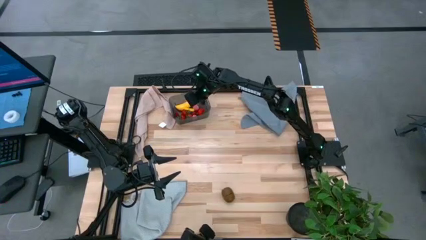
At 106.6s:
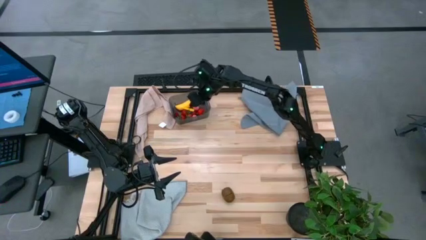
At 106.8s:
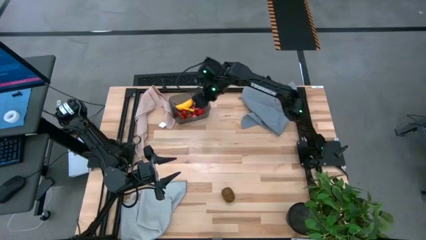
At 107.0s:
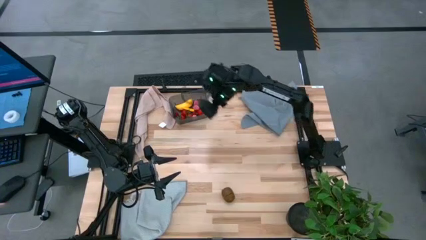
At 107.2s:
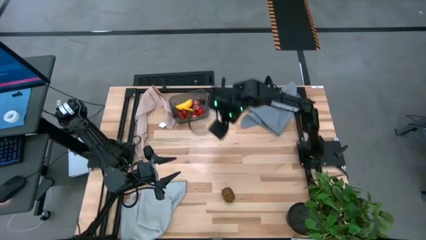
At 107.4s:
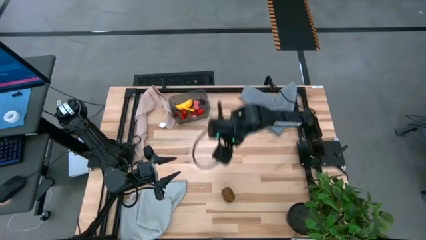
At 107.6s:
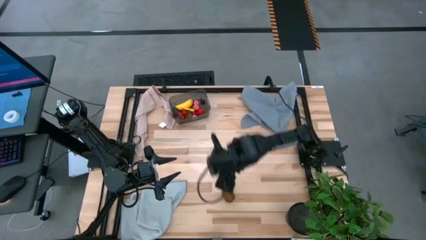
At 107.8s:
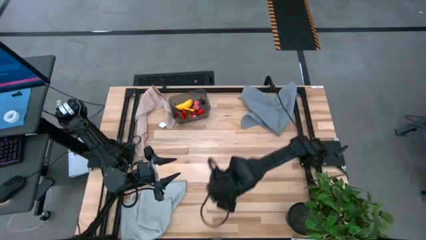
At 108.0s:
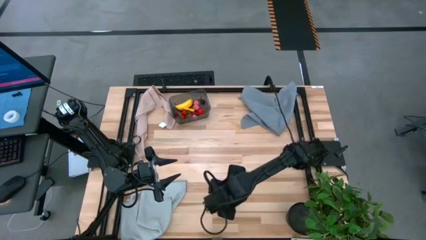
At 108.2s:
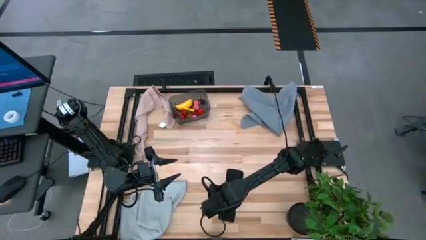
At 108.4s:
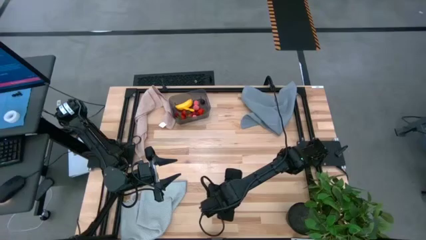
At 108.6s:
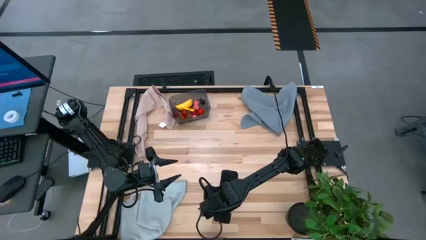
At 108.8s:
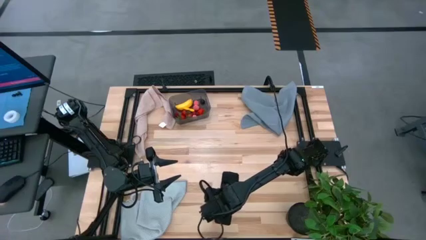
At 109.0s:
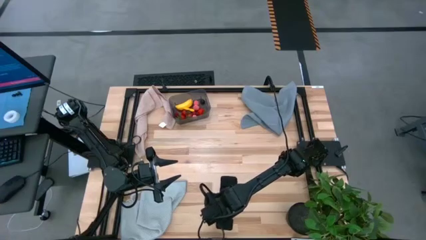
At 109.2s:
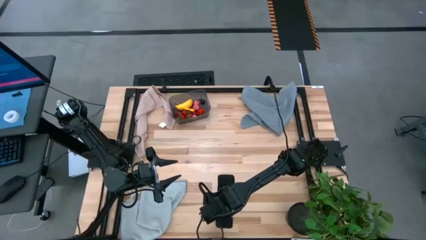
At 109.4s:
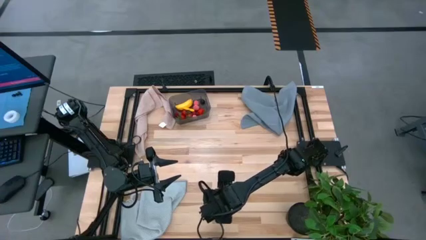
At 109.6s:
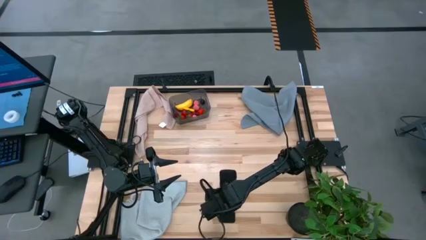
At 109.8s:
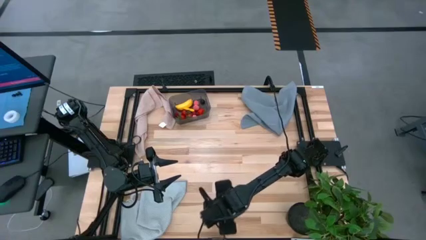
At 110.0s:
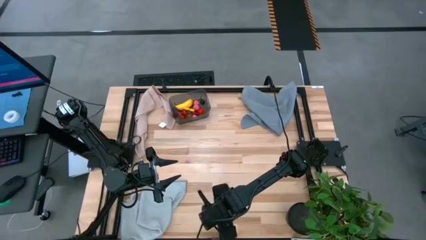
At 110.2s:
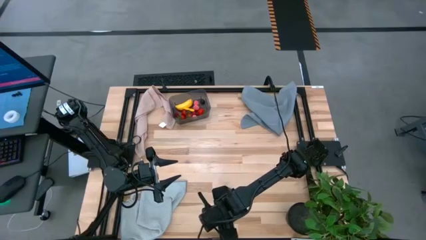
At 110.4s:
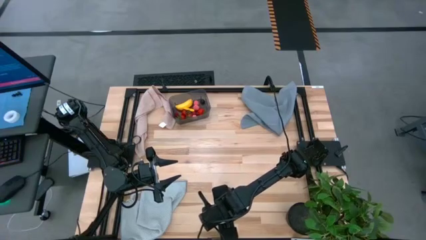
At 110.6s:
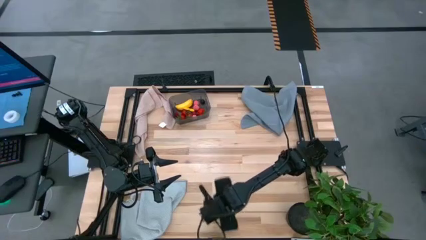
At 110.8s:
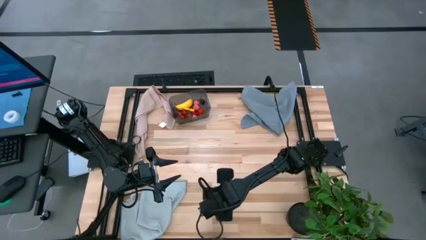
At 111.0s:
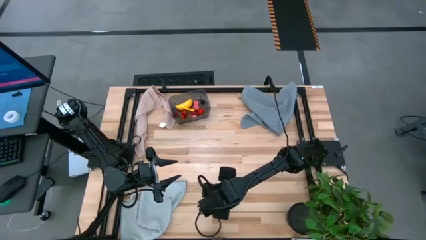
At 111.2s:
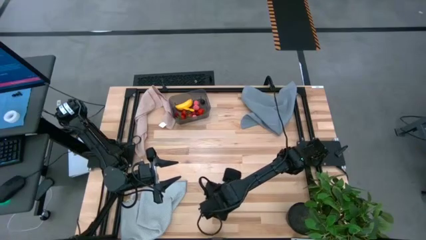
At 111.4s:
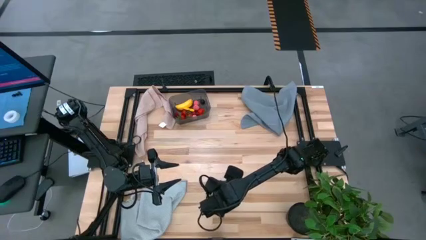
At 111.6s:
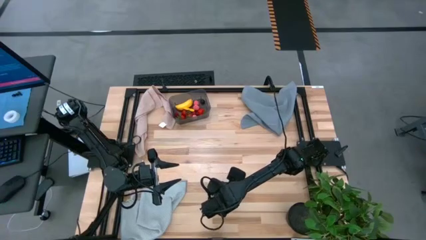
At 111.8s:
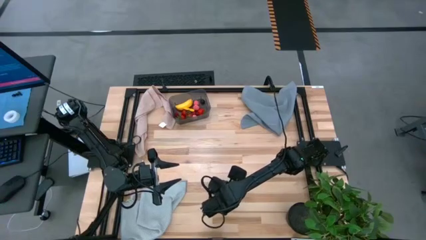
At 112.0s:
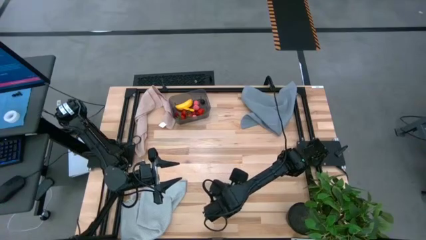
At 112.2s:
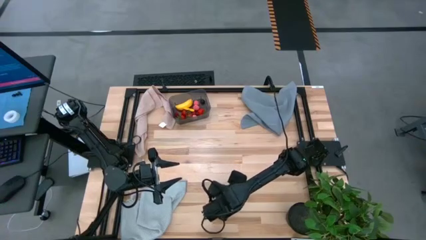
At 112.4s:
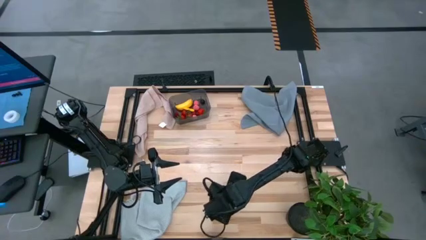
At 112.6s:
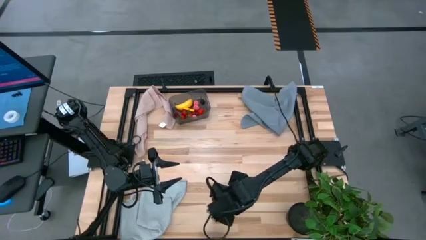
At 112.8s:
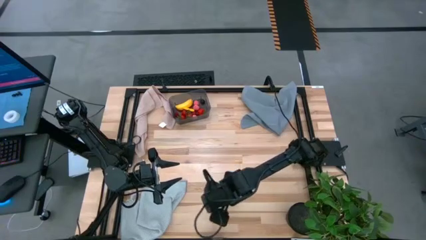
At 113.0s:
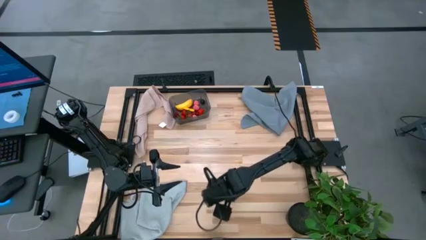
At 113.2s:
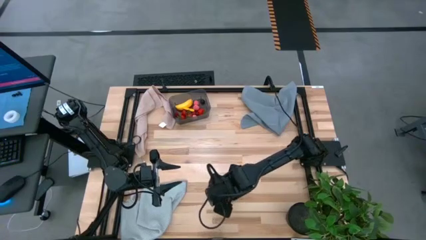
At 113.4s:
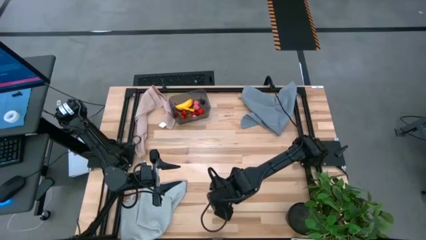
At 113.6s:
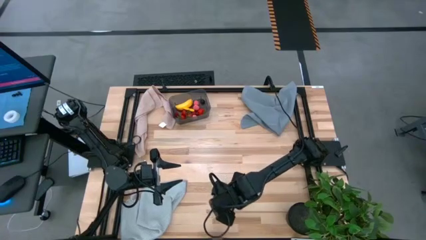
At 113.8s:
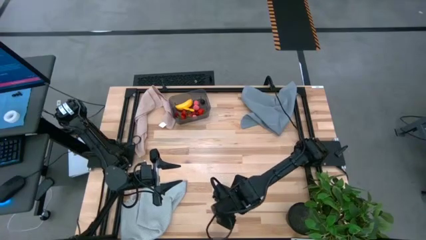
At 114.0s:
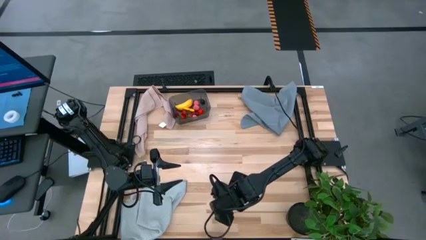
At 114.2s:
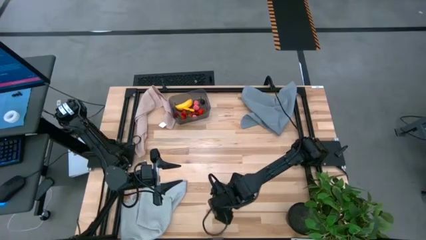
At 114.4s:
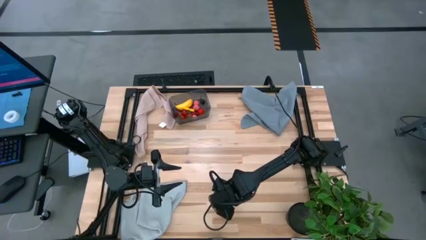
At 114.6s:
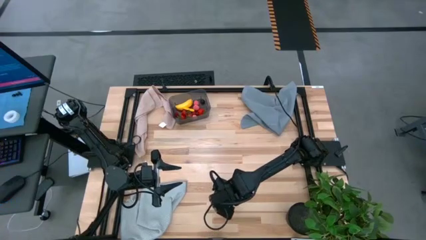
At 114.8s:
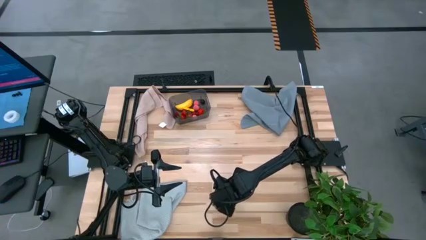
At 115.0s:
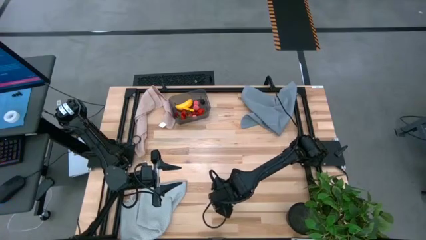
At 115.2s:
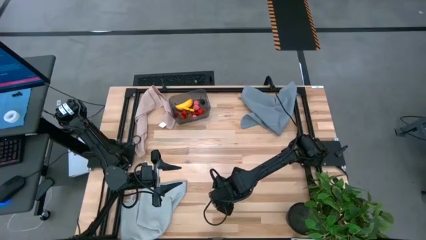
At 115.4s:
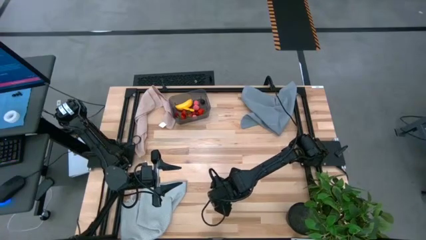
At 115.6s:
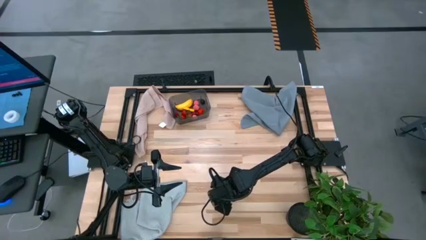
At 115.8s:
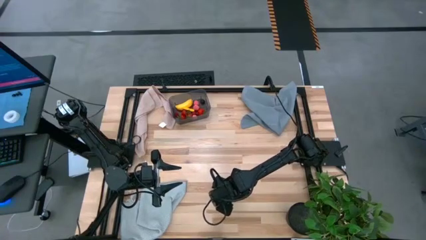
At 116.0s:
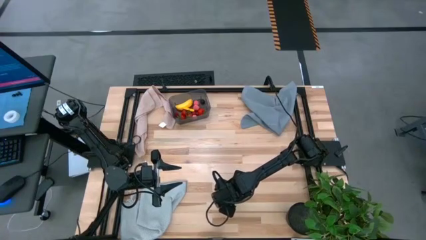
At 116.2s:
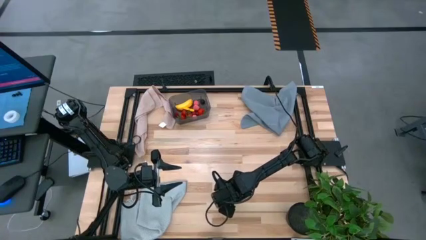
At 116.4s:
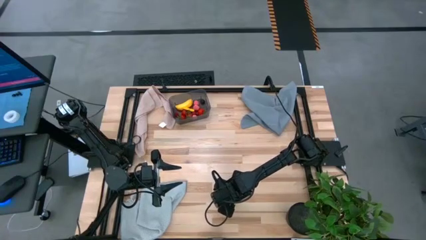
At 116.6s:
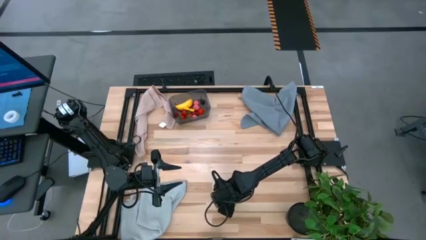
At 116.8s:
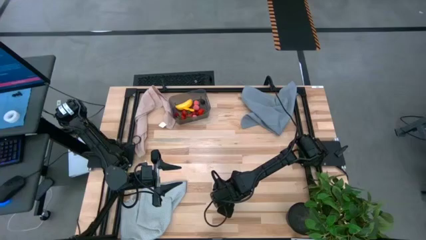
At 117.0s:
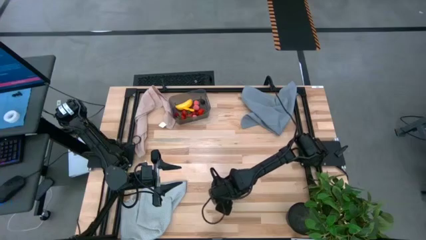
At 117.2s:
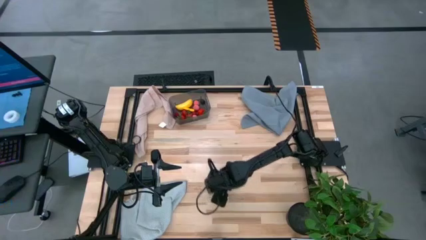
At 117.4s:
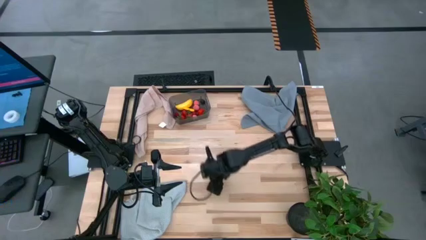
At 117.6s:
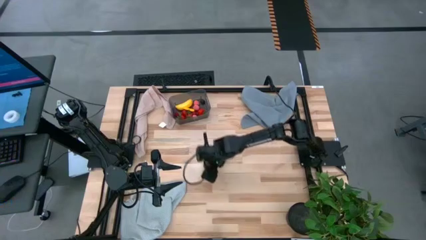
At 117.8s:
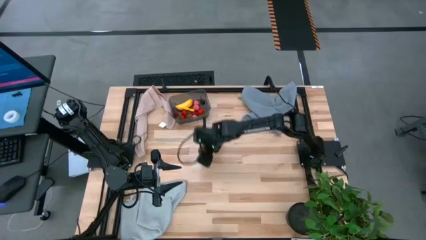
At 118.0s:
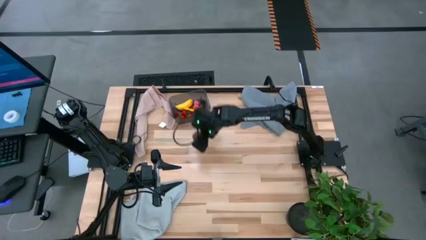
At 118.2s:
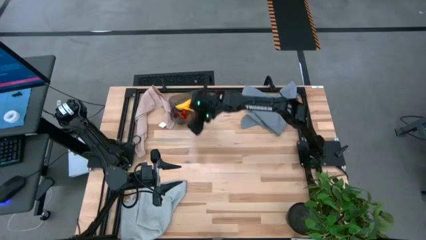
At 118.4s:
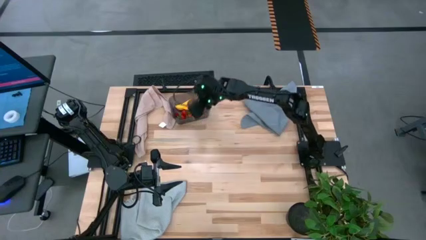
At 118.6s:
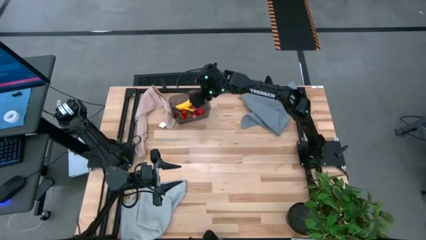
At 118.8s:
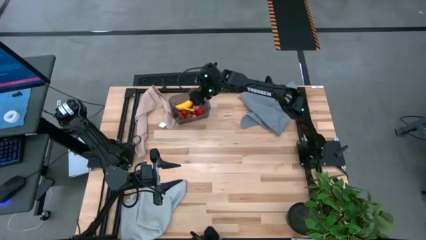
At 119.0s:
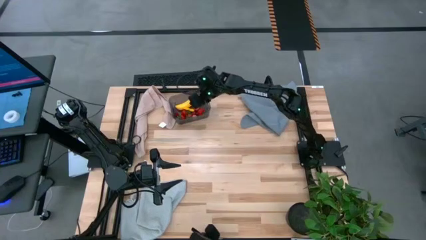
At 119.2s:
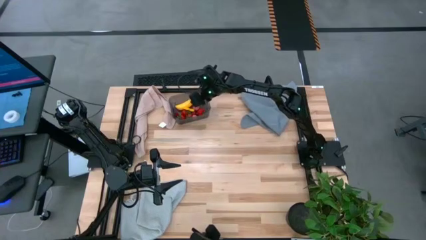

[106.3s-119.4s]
Task: Pick and placing Produce into tupperware
Put the brown kiwi into the black bin

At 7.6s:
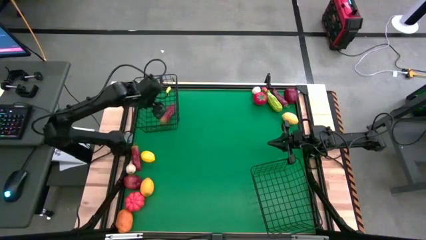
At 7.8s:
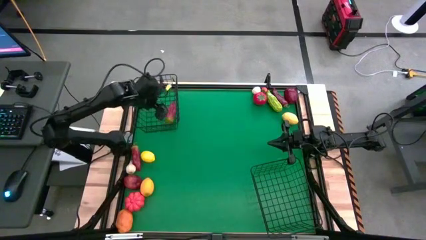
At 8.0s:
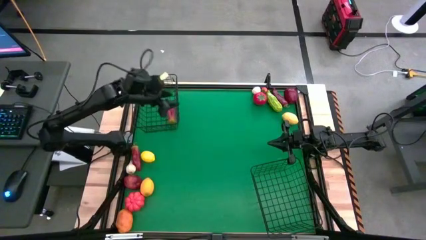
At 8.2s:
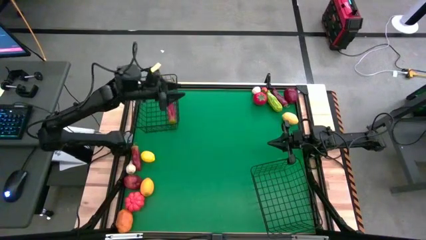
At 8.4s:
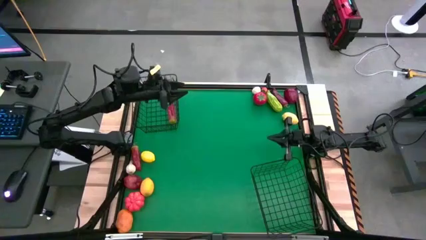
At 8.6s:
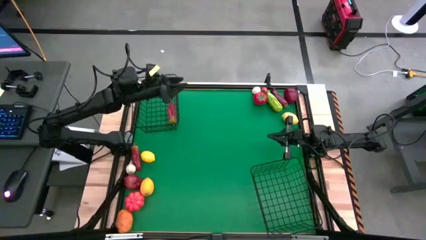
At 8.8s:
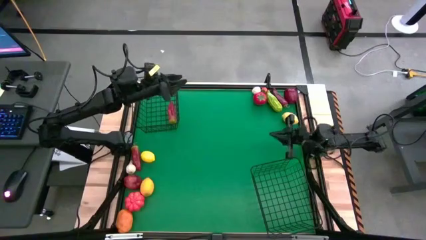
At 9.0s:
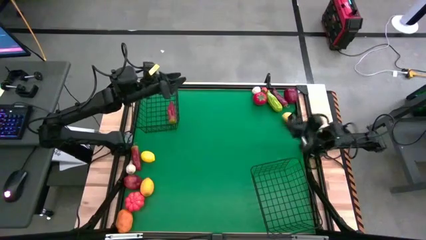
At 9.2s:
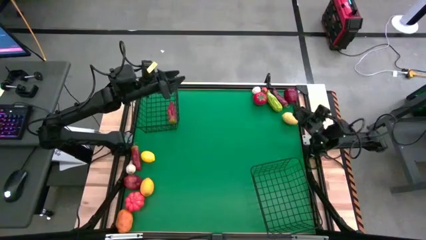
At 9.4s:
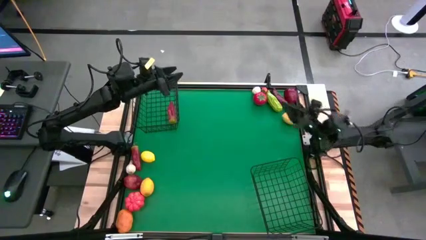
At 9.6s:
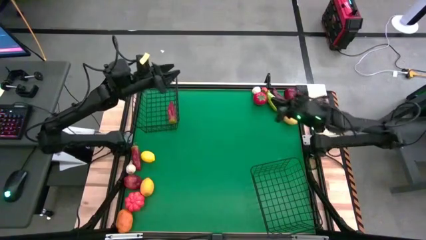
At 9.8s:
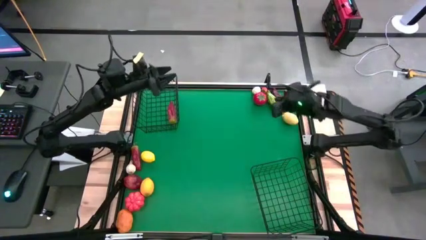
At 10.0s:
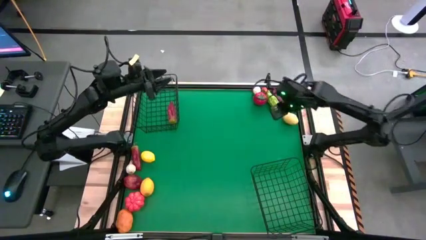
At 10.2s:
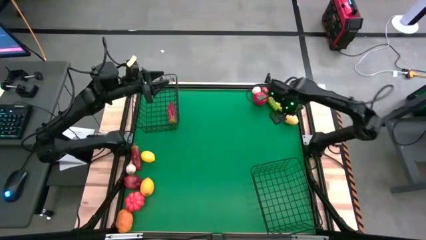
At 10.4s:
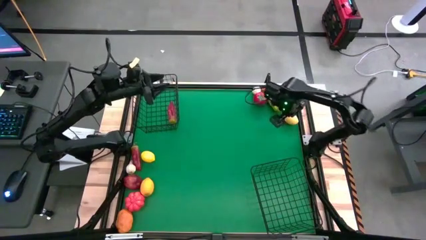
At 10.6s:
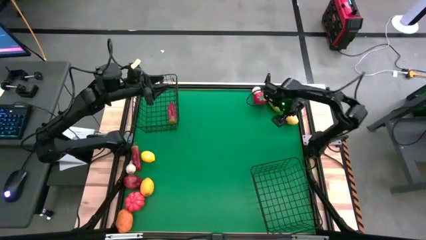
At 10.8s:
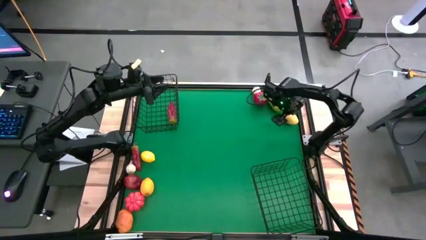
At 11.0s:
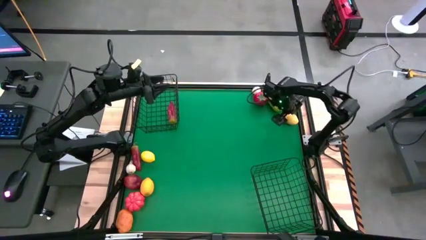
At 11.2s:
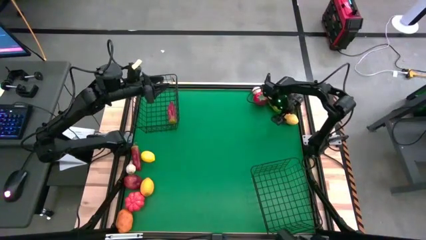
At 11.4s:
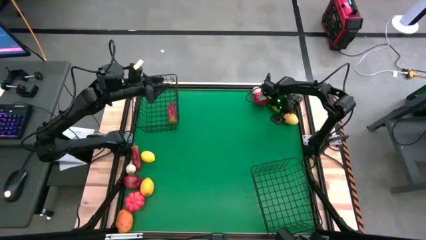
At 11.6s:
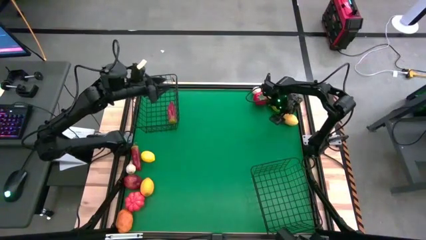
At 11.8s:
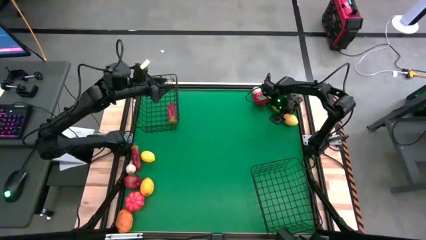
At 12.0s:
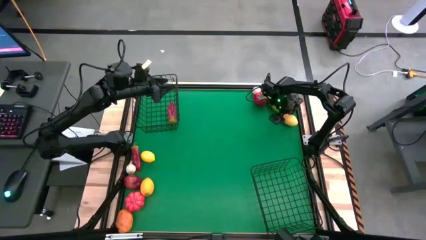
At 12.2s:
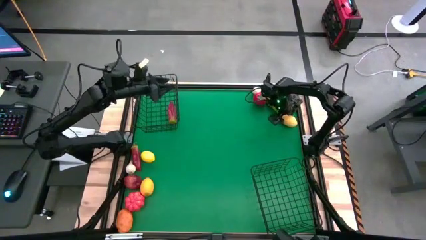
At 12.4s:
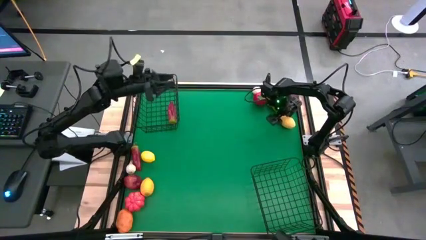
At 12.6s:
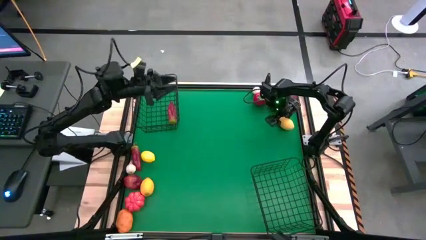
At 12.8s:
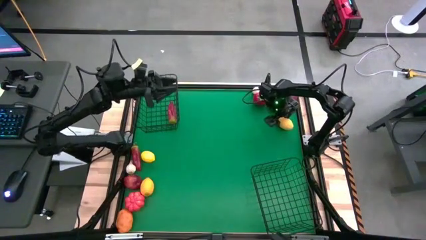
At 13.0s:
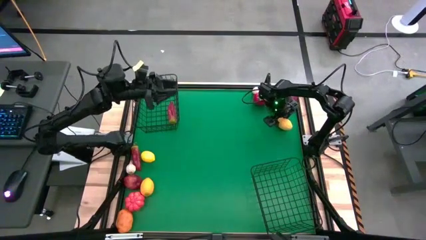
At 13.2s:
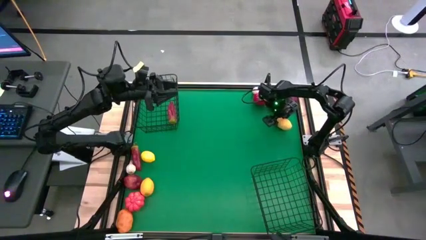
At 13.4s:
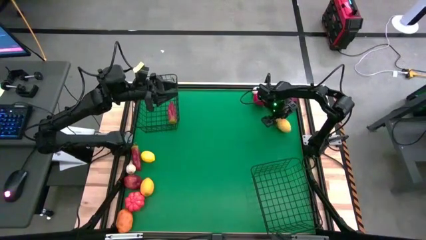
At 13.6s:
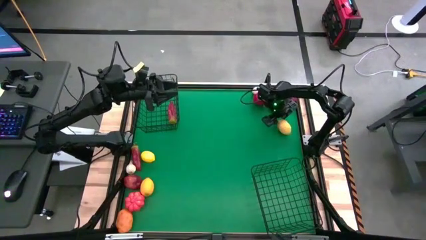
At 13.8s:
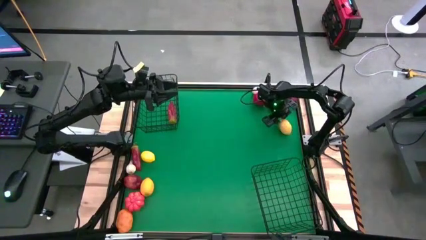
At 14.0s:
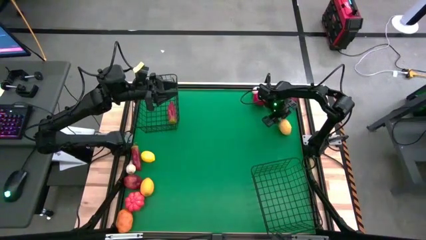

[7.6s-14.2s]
Task: Sort produce into baskets
Put the top yellow lemon into the bottom black wire basket
